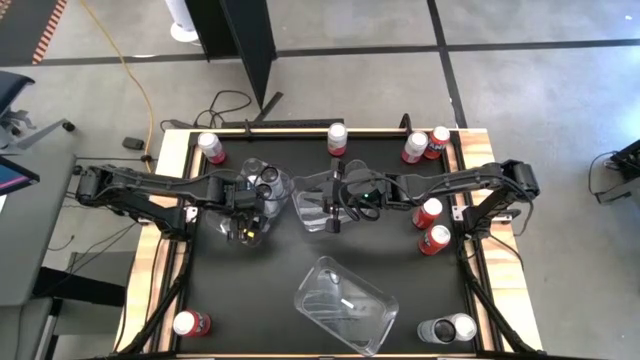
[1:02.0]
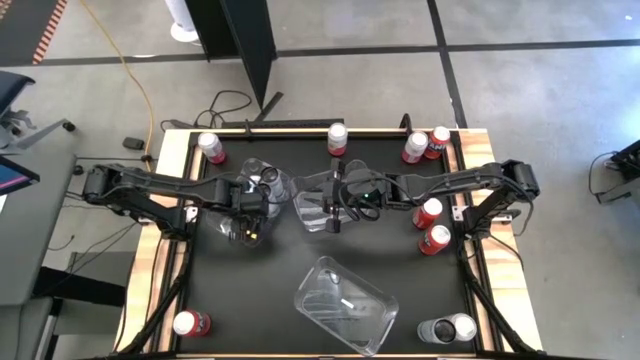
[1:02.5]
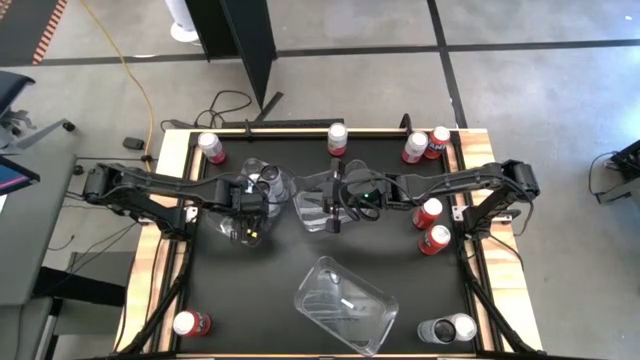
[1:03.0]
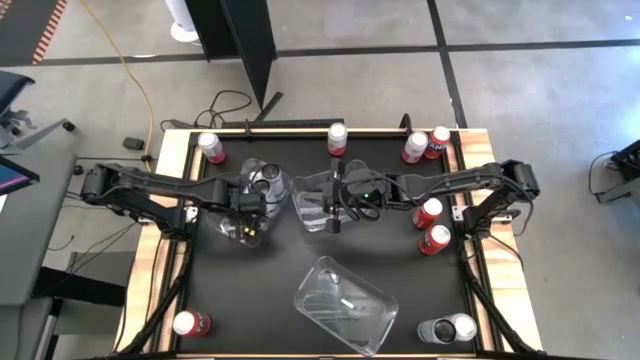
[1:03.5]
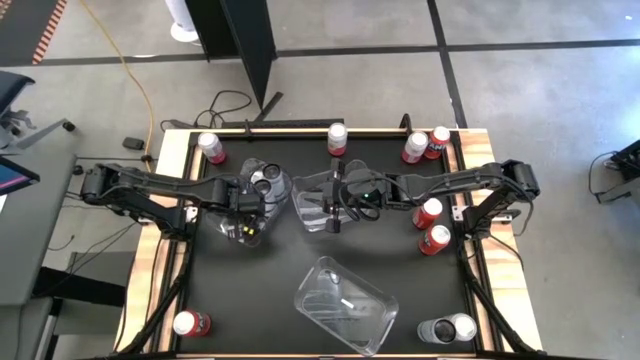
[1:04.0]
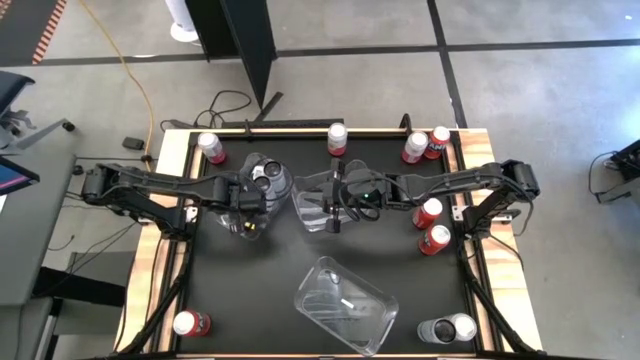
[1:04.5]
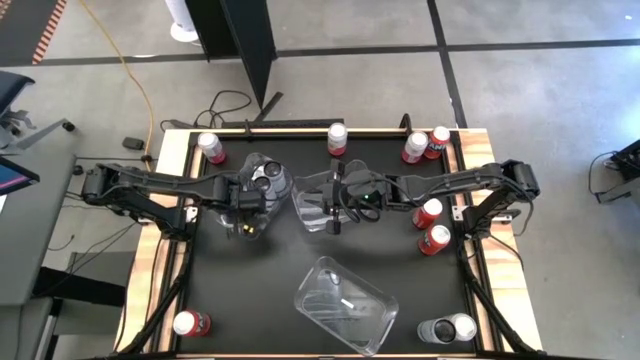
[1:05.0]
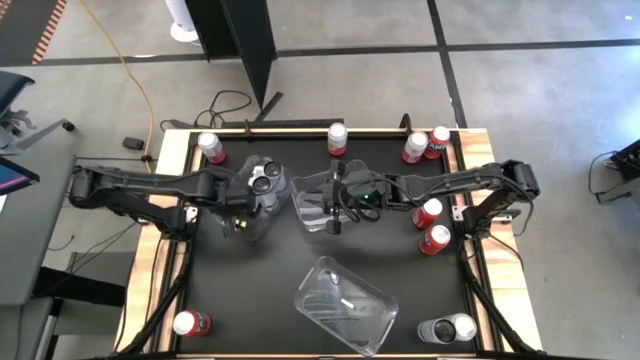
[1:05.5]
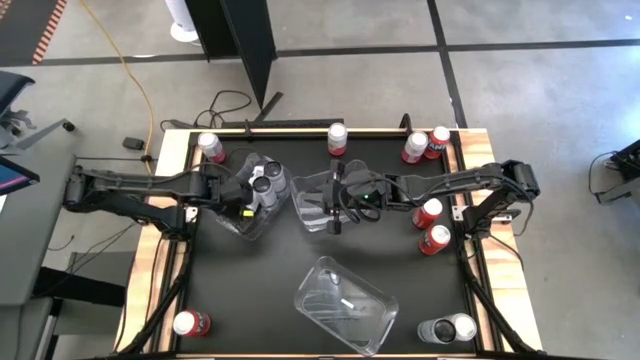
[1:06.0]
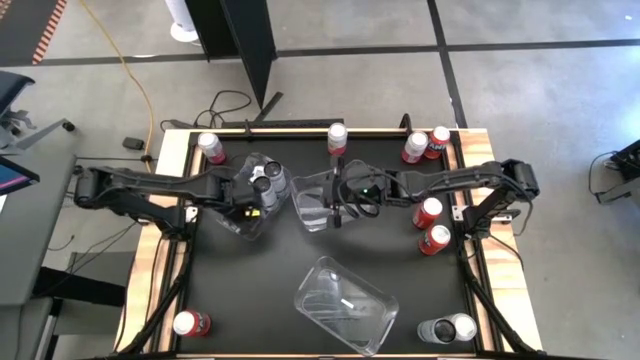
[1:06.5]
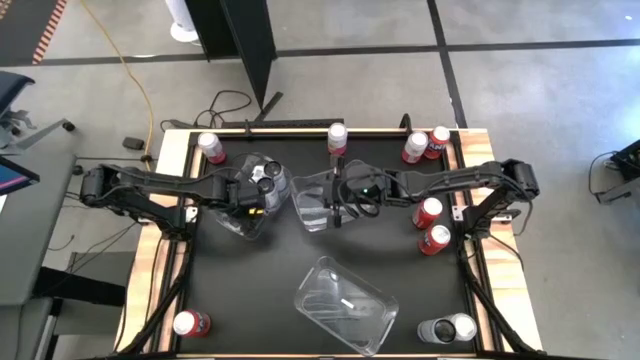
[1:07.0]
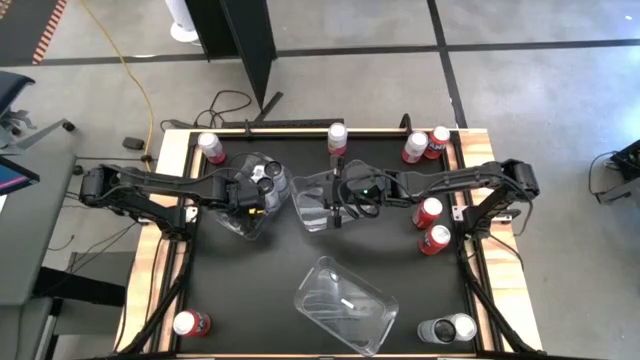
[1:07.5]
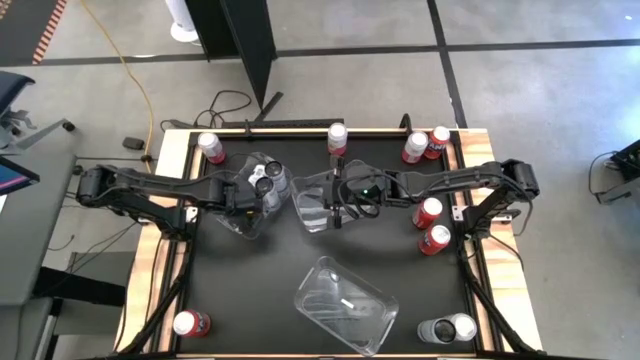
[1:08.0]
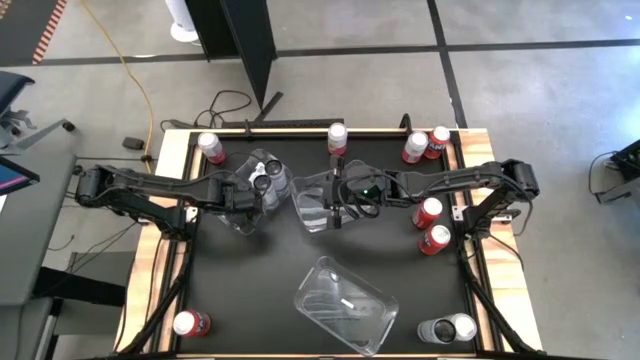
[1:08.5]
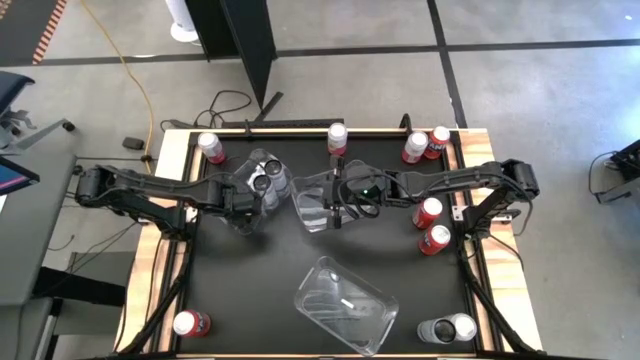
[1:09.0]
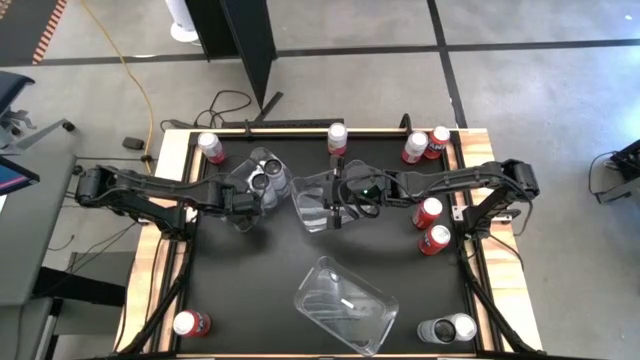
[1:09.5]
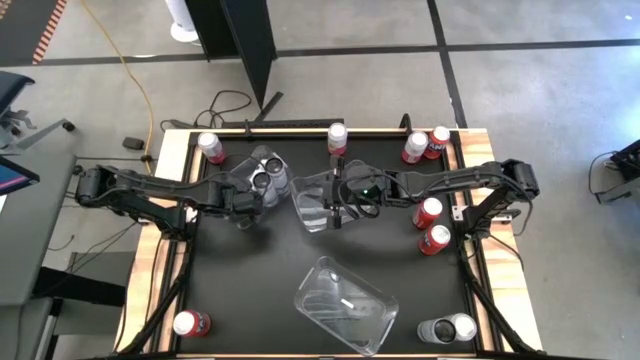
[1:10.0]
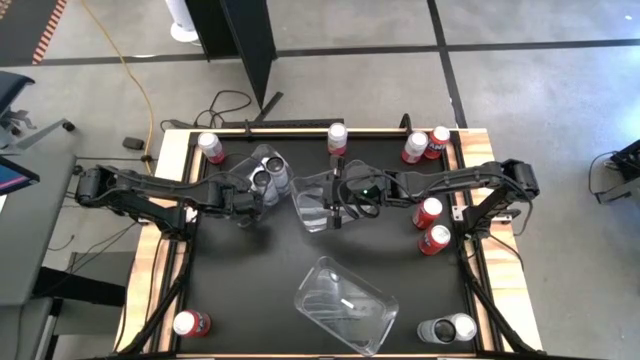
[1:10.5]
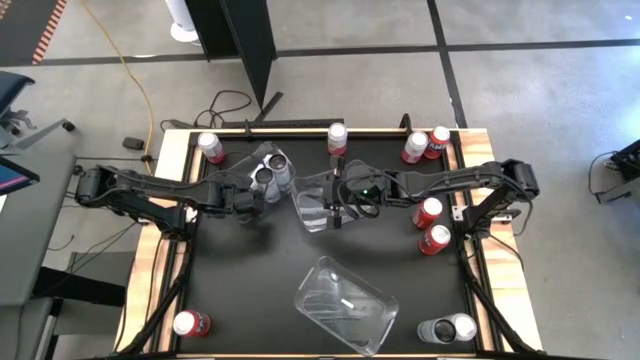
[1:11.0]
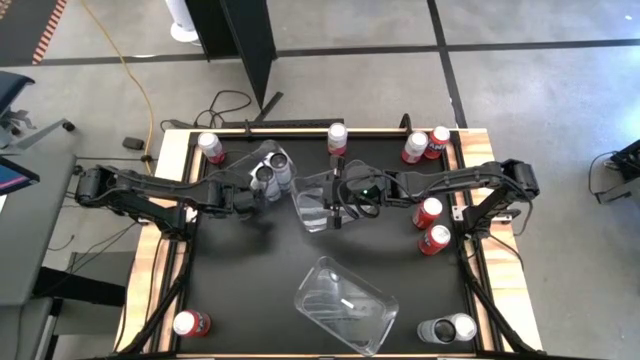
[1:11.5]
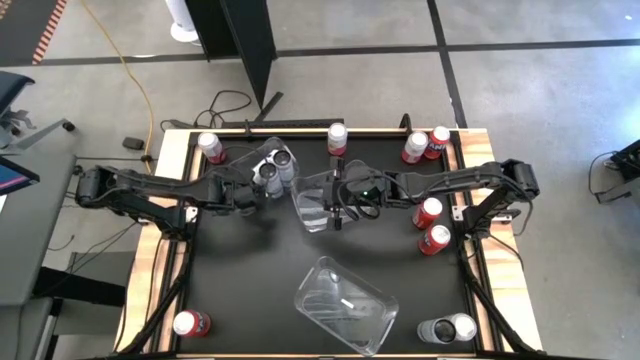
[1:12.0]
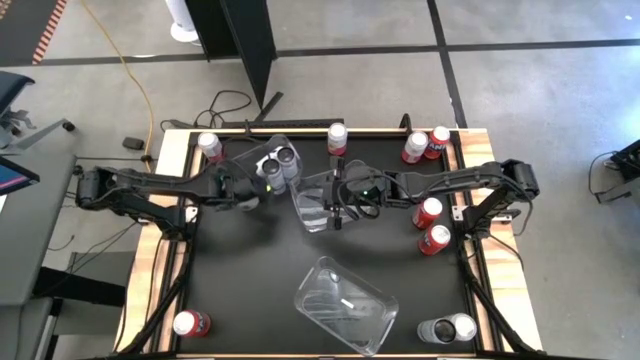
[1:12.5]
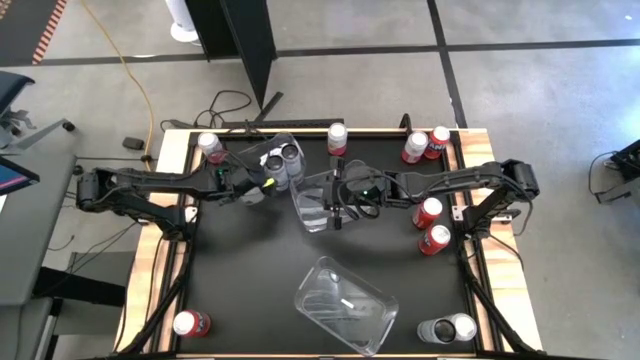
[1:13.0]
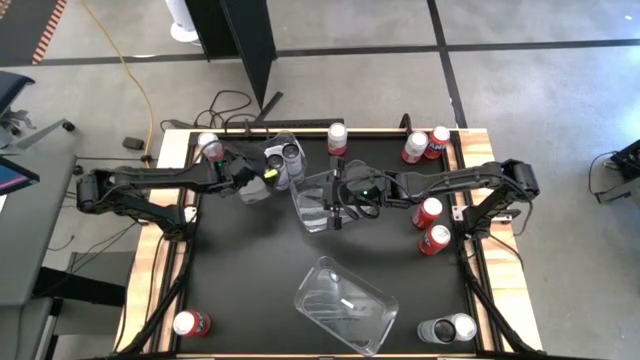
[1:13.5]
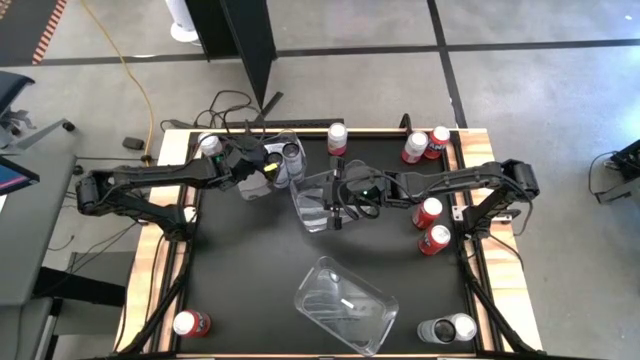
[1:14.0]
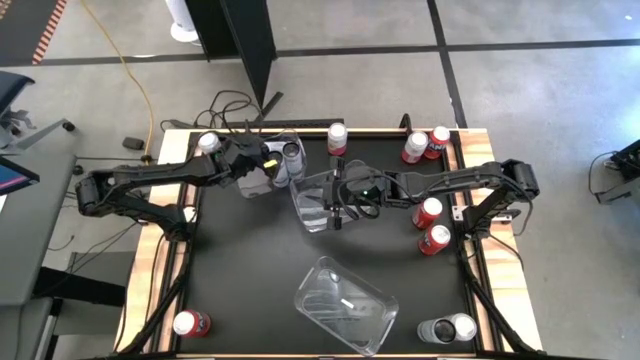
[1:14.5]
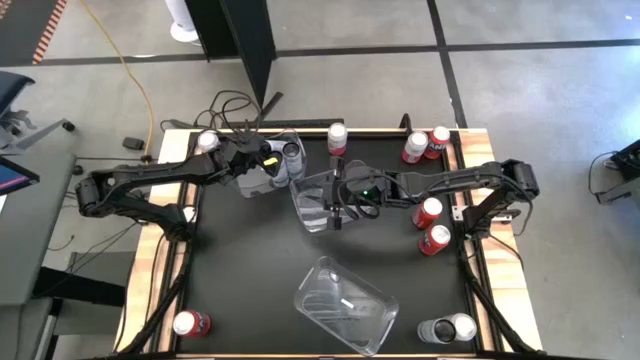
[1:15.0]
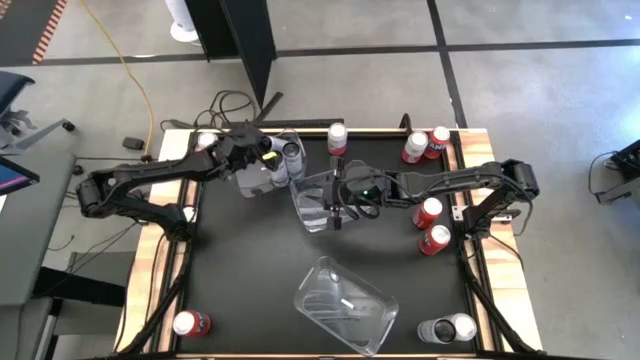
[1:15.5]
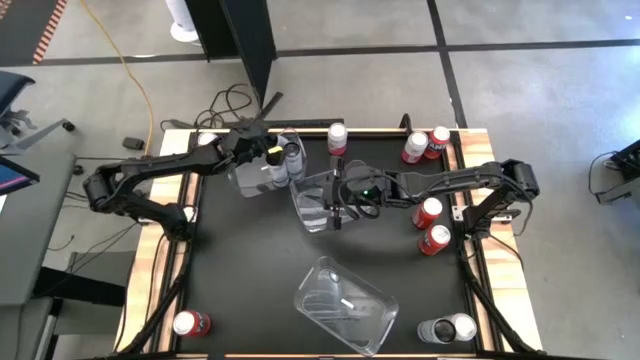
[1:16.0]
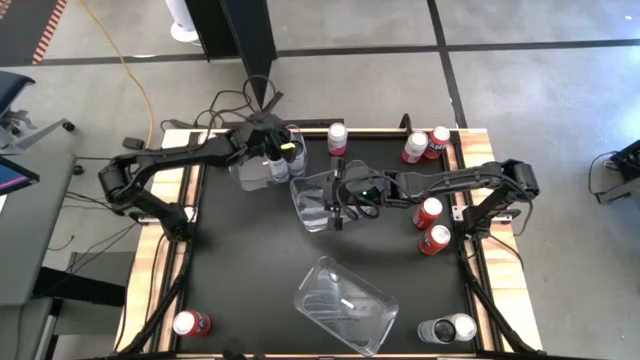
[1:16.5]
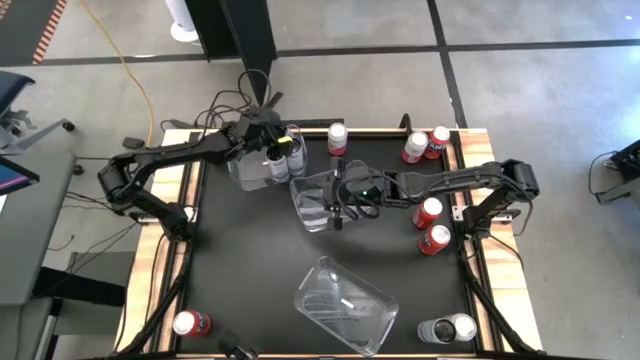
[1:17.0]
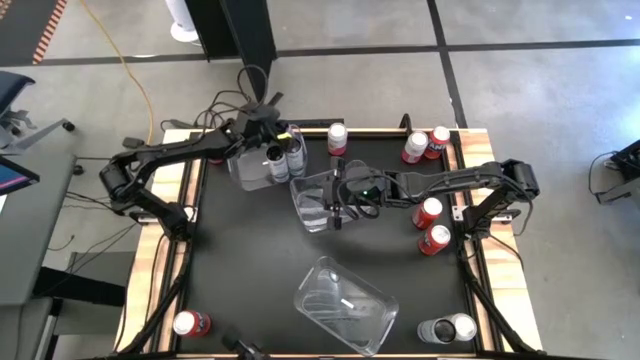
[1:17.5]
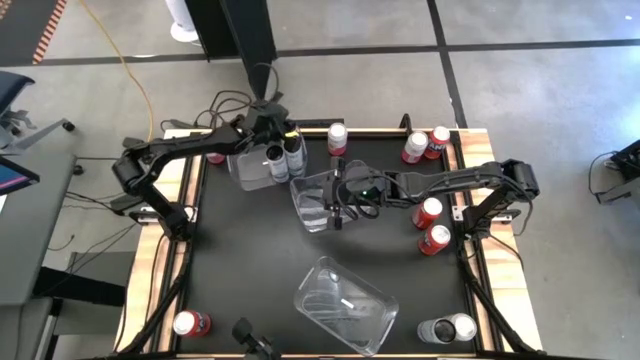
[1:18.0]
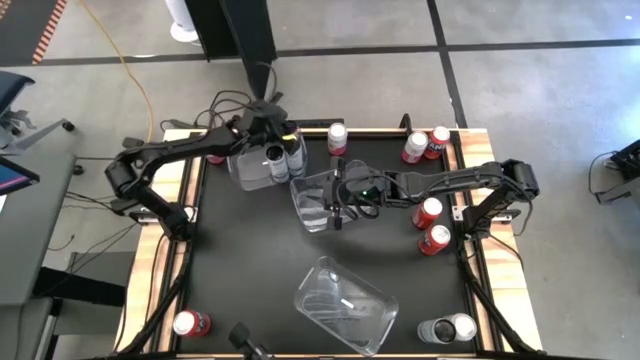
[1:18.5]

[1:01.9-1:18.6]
Task: Sort soda cans
Put the left black soda can in the top left transparent bin
